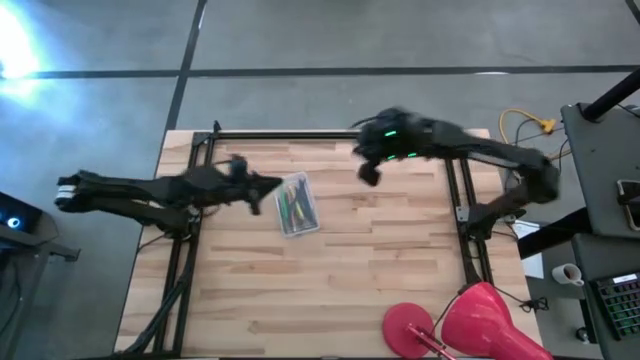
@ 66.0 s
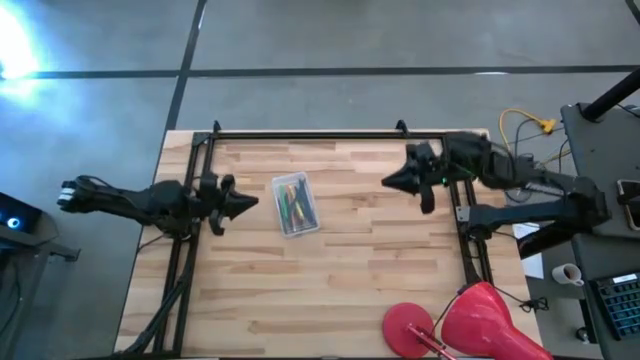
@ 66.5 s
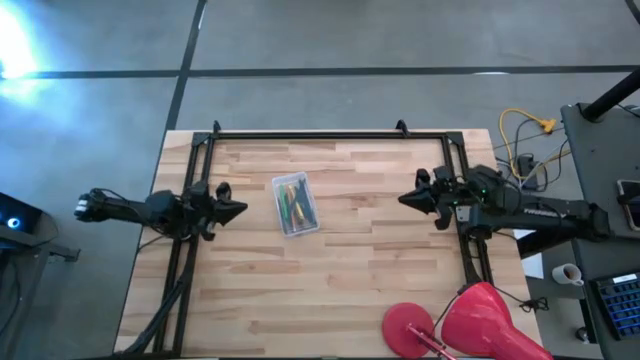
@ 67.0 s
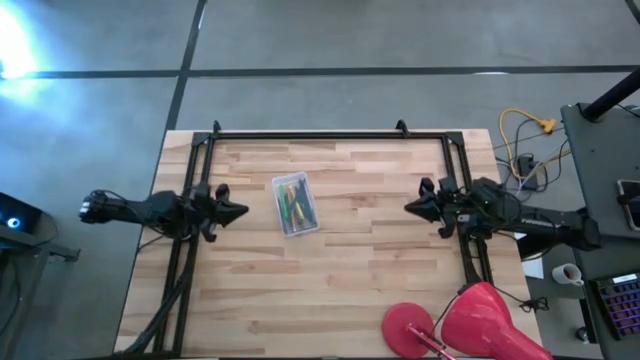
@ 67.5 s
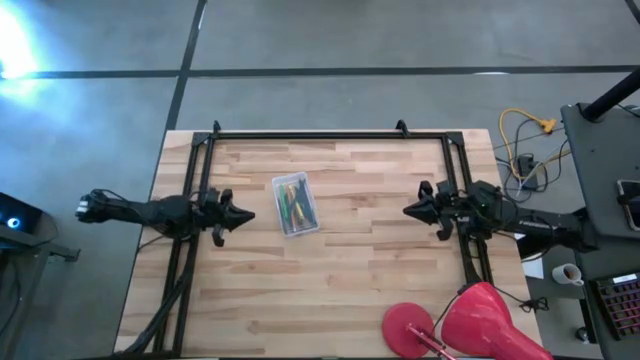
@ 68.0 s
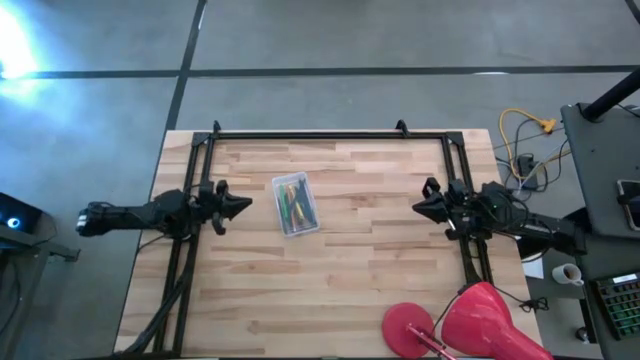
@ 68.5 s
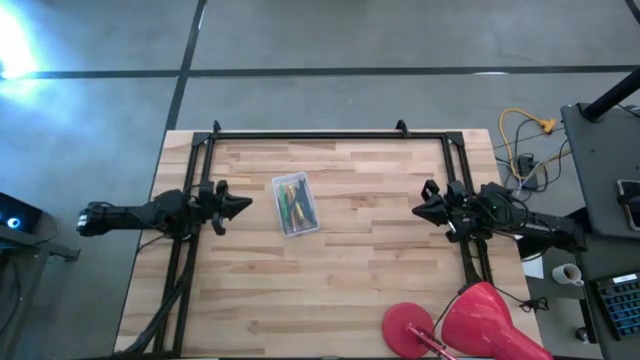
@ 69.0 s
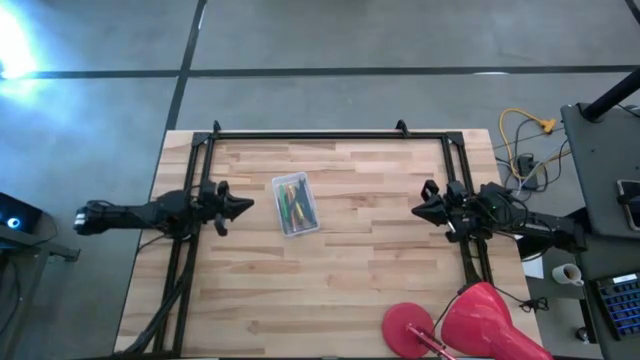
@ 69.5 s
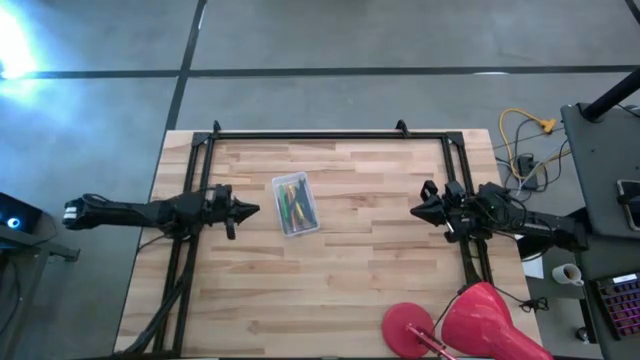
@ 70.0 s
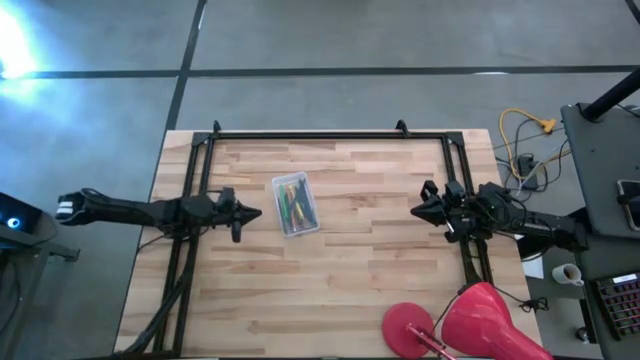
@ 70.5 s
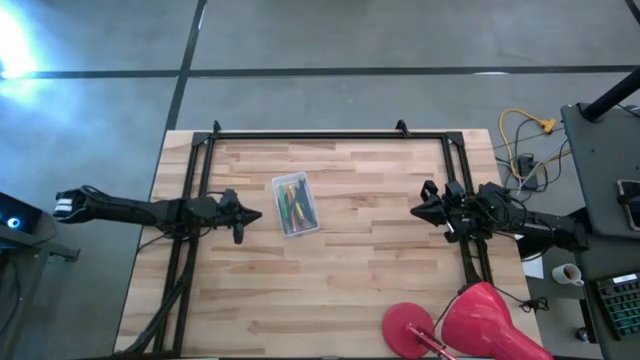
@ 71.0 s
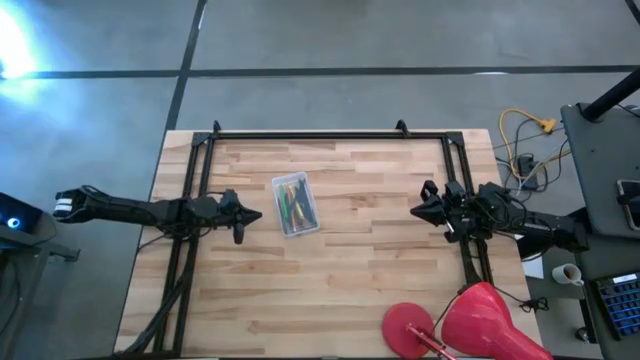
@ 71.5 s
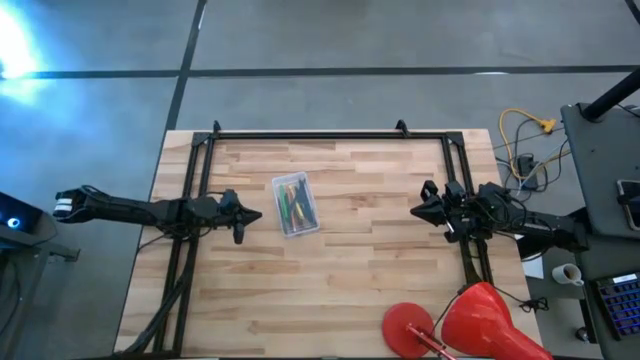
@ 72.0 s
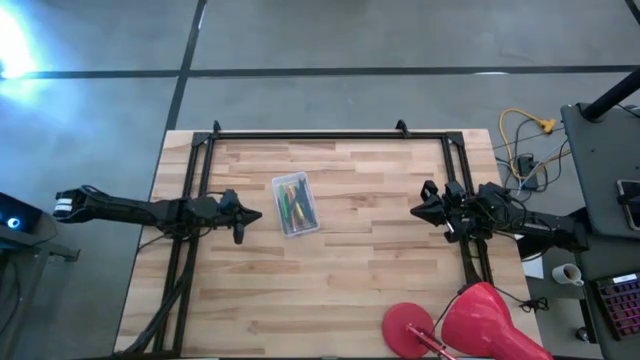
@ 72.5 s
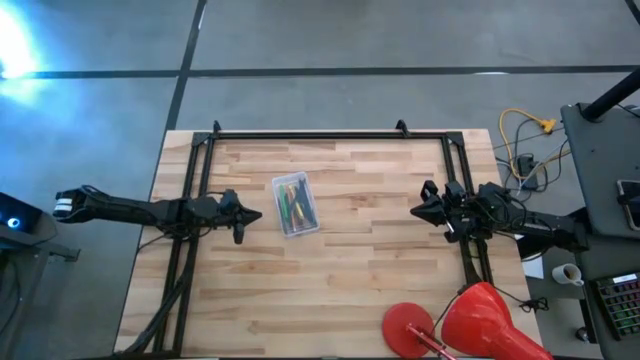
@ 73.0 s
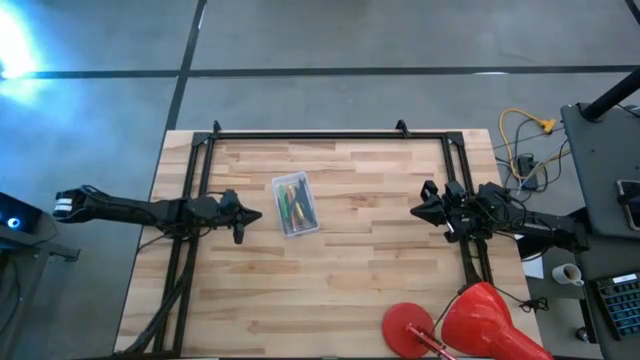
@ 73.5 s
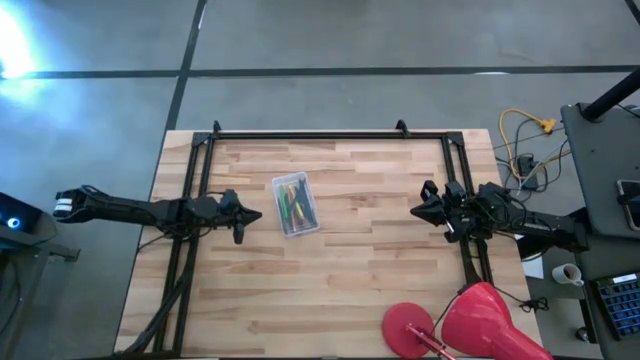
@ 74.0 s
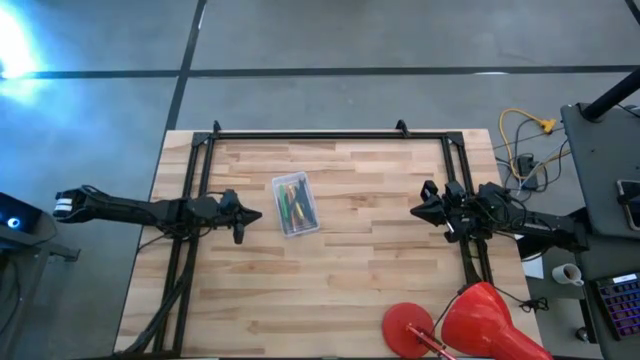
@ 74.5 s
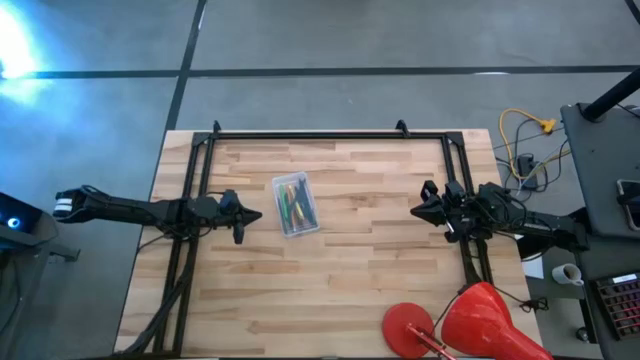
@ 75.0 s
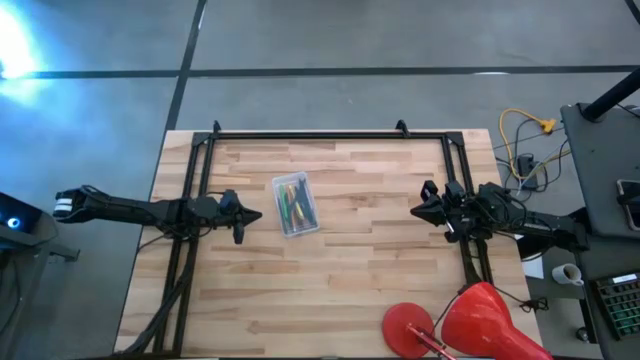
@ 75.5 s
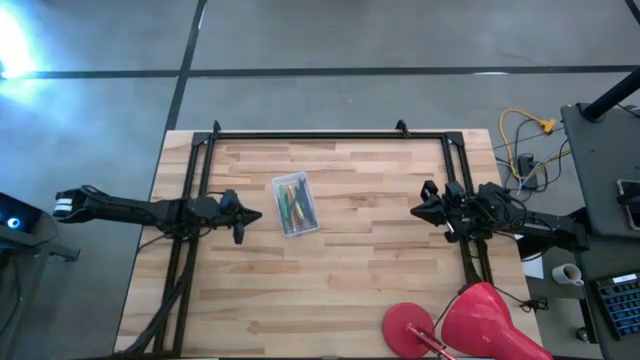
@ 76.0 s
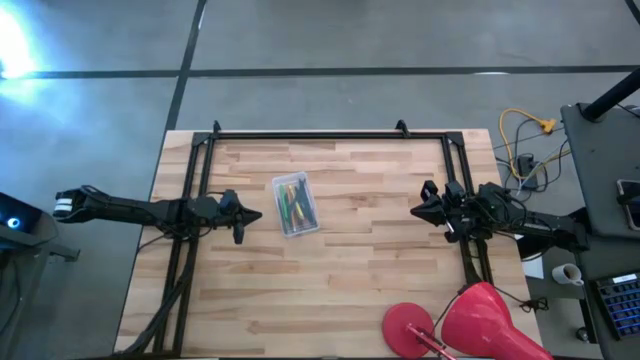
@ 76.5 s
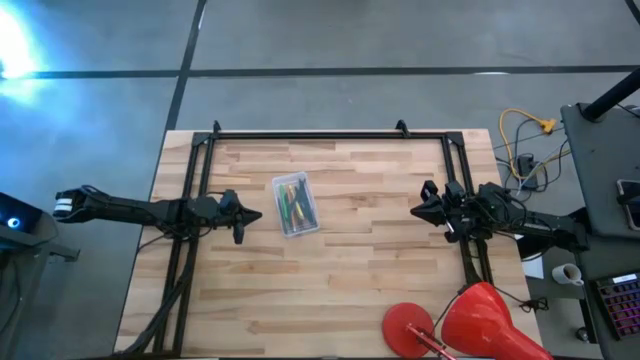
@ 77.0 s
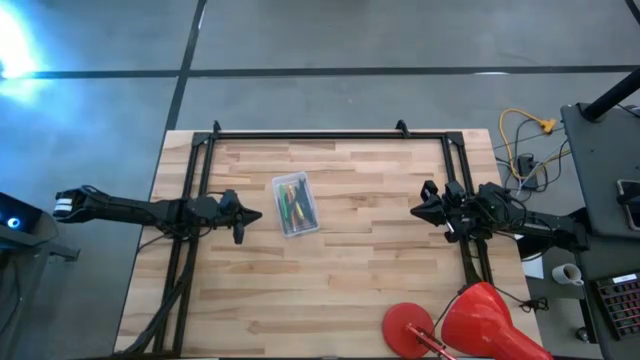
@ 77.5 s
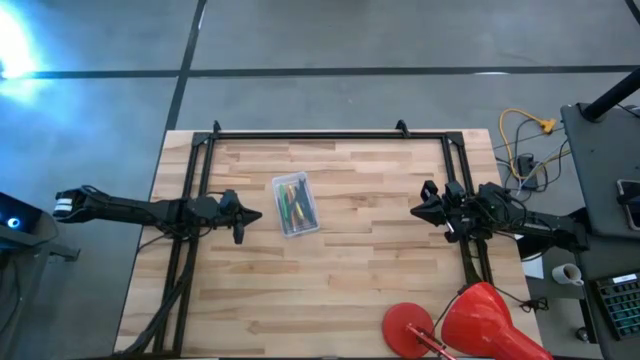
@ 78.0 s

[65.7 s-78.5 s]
Task: Pick & place school supplies into a supply box
Return to Home Position

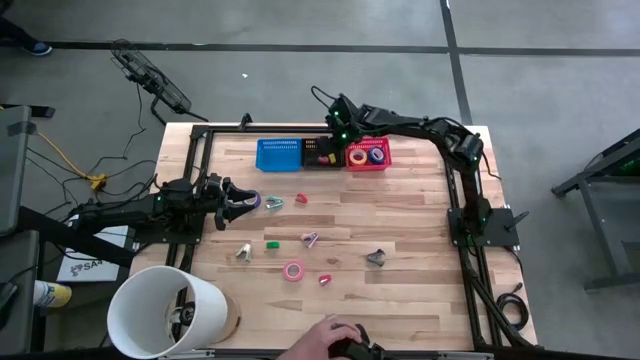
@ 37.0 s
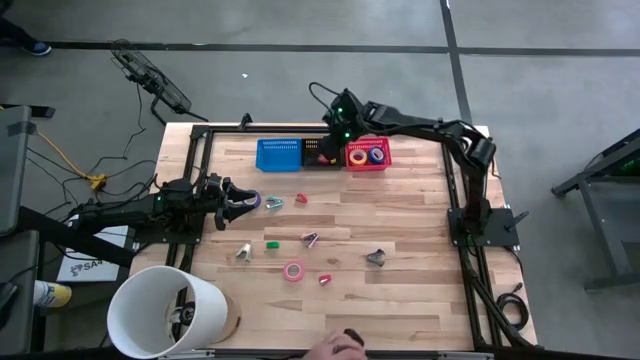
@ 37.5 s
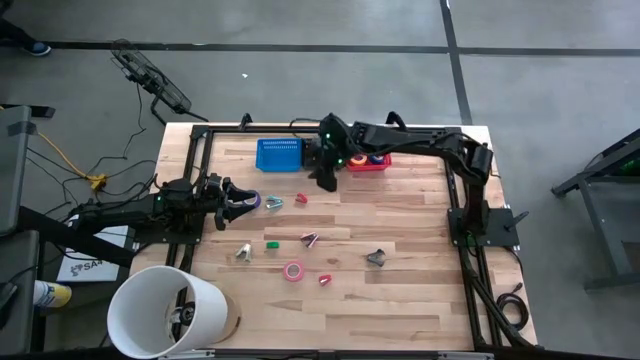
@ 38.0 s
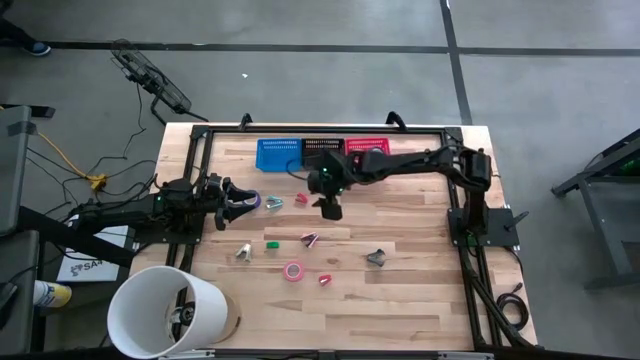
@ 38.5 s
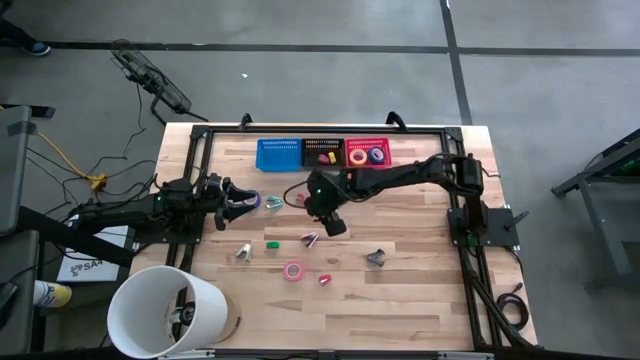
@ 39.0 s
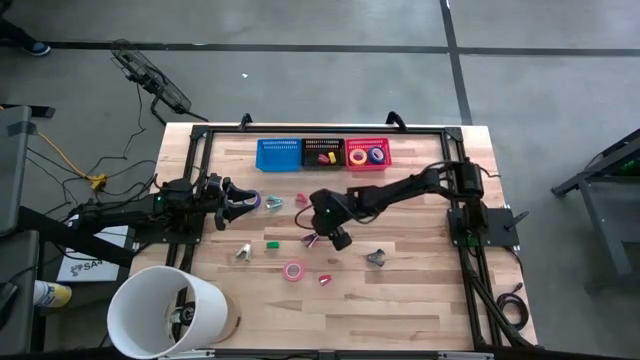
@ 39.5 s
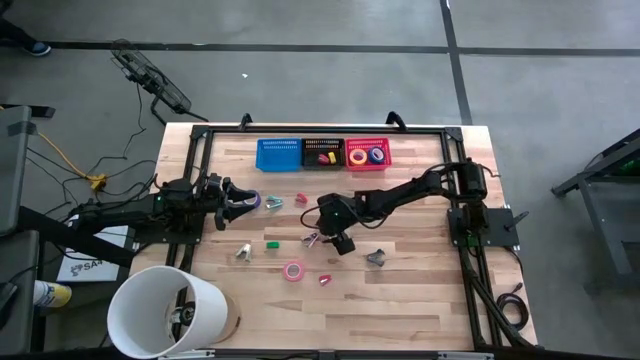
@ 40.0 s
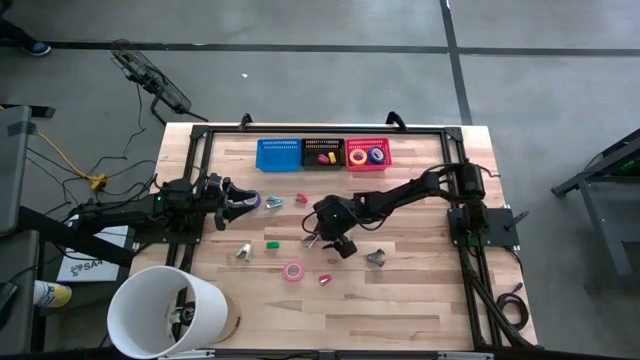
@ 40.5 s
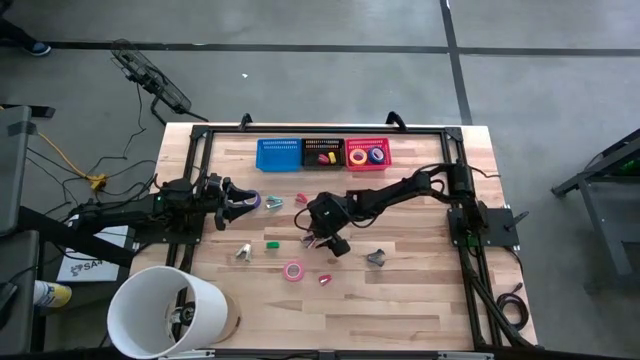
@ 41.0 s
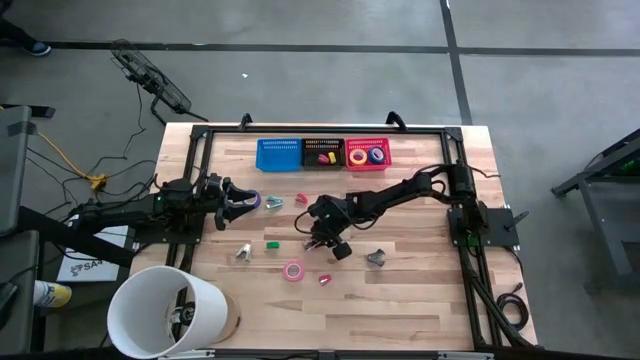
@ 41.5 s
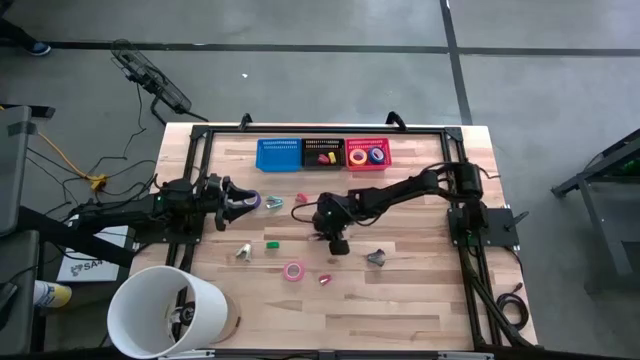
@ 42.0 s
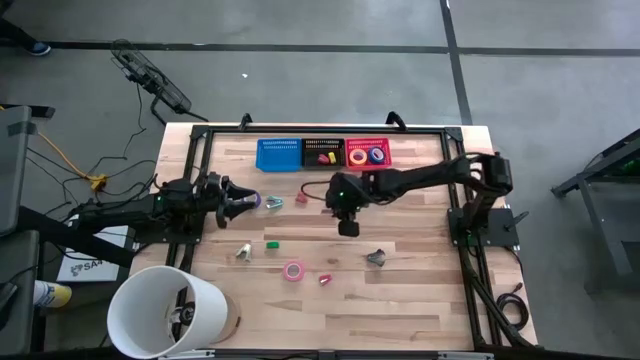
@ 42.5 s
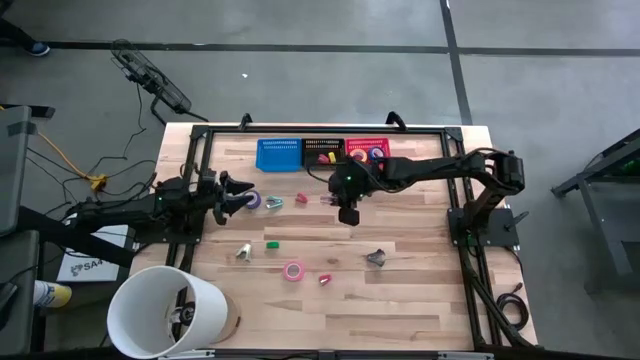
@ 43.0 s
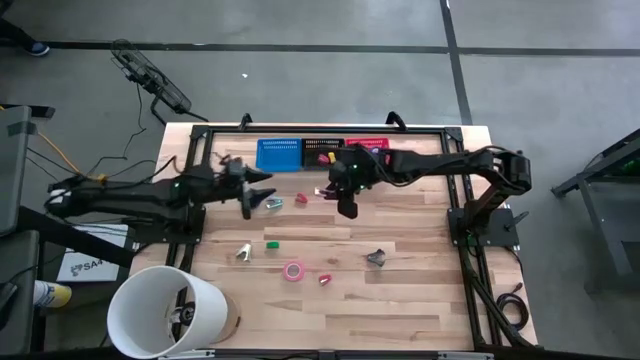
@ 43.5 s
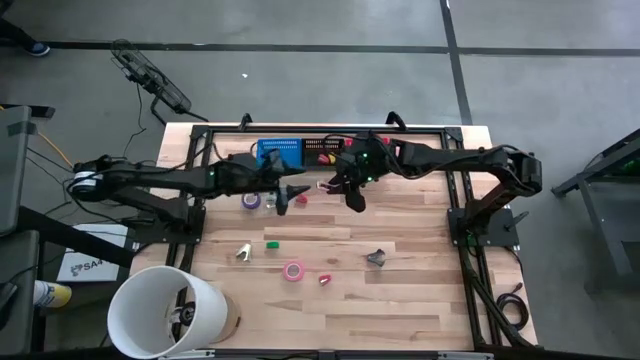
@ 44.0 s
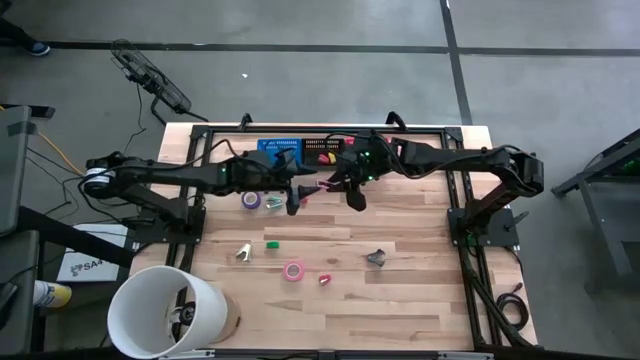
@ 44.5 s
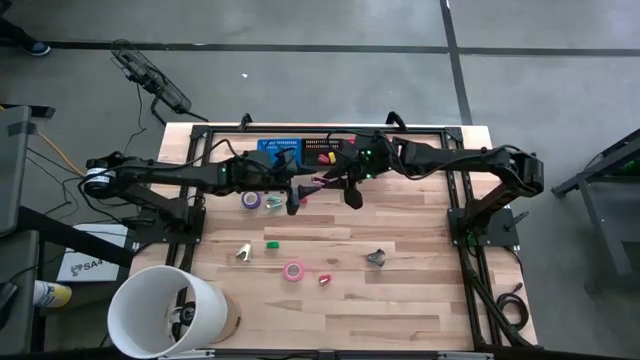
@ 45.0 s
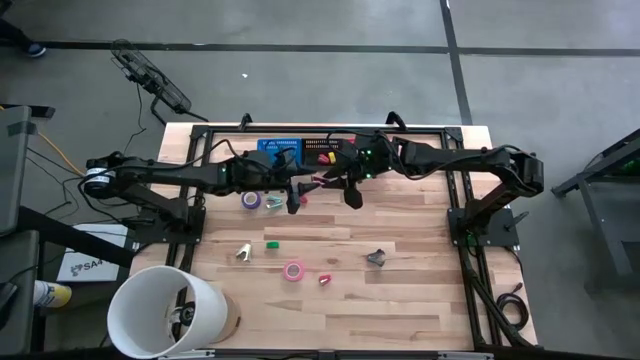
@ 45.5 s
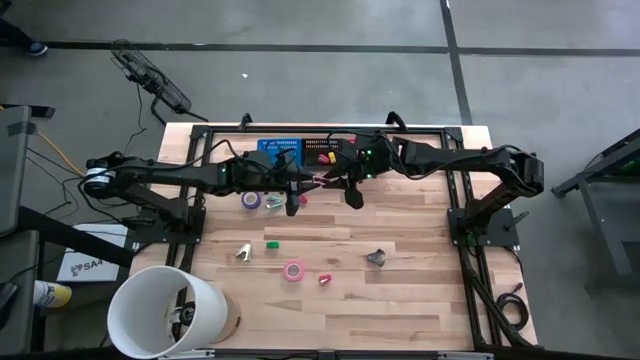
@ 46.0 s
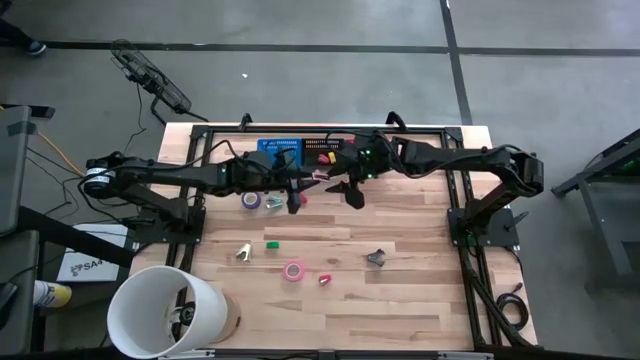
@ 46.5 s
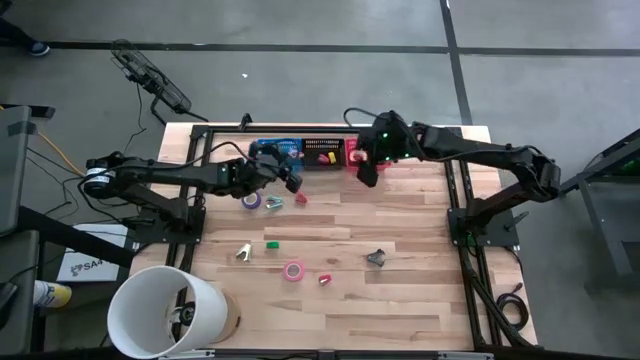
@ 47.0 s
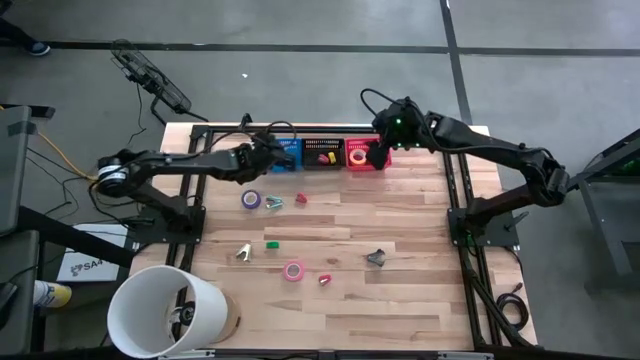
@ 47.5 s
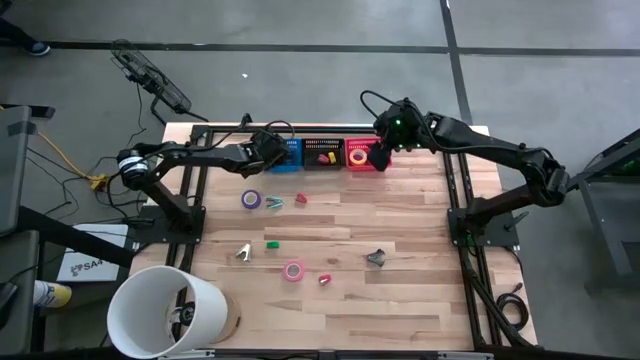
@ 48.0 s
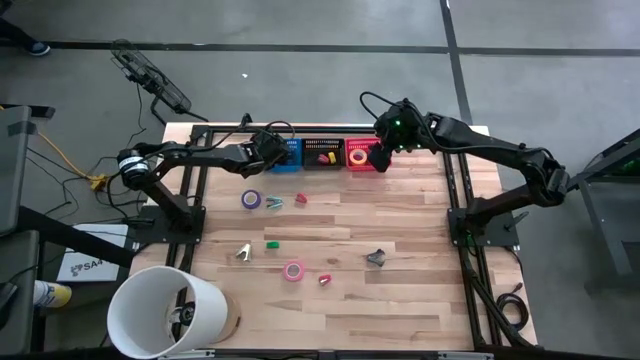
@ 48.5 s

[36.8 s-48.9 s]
Task: Pick and place Stapler, Stapler remover, tape
Put the pink staple remover into the blue bin
